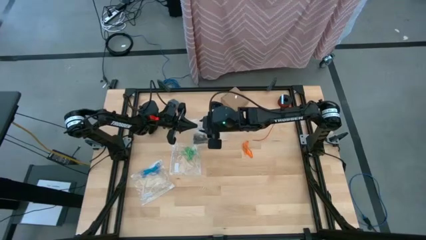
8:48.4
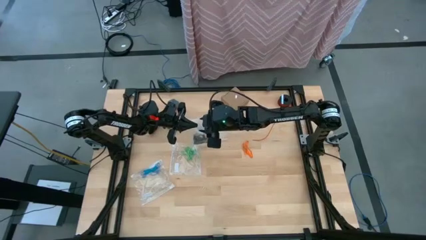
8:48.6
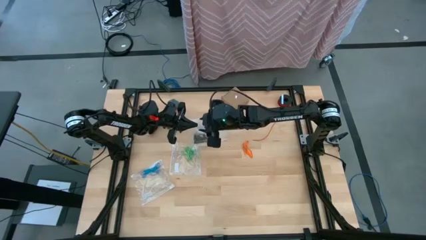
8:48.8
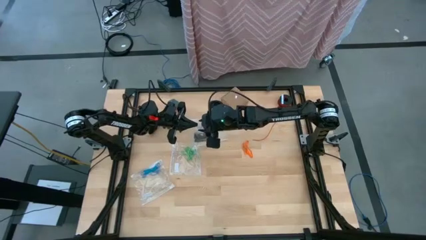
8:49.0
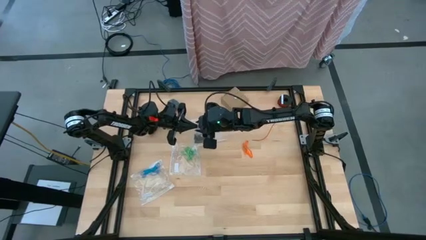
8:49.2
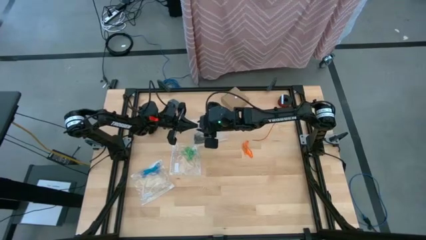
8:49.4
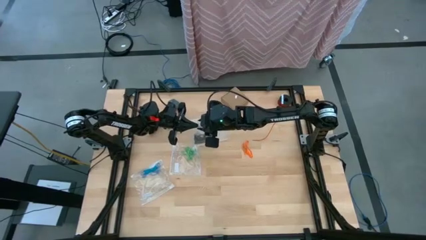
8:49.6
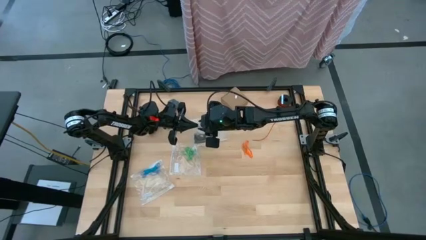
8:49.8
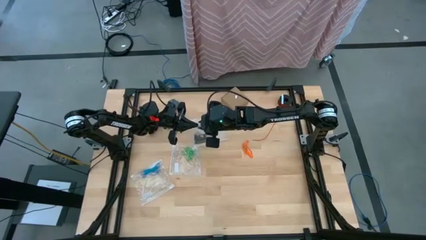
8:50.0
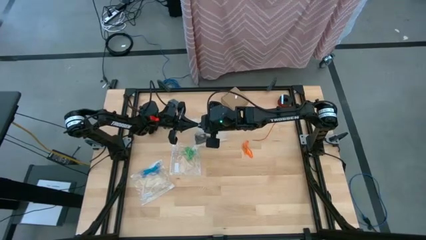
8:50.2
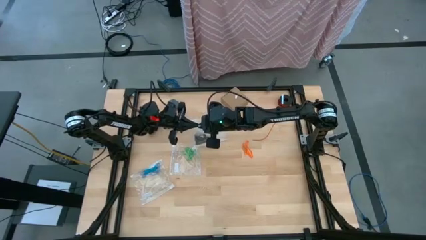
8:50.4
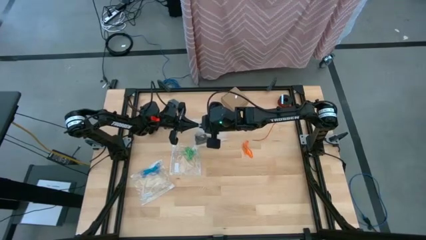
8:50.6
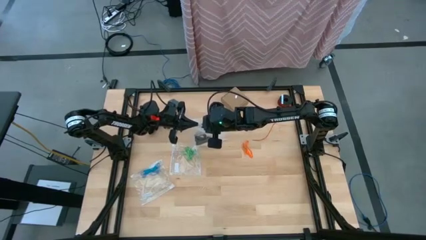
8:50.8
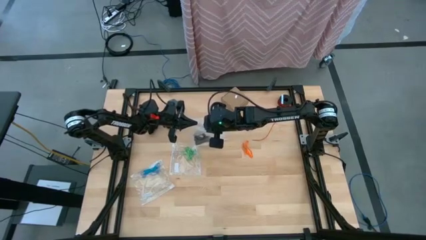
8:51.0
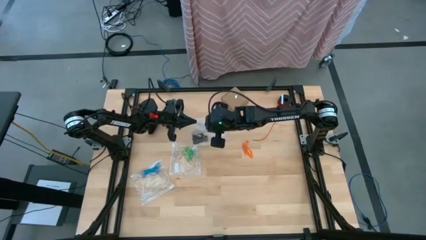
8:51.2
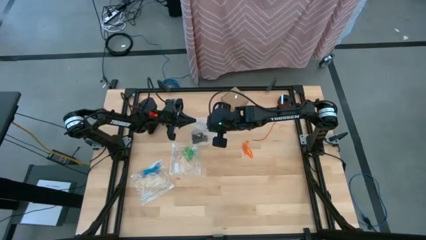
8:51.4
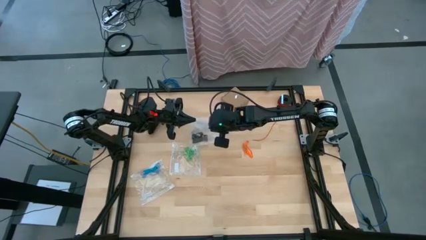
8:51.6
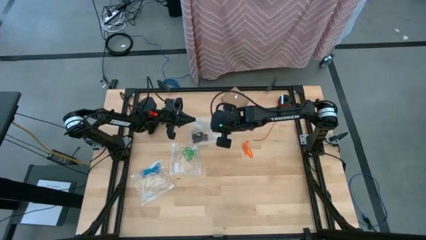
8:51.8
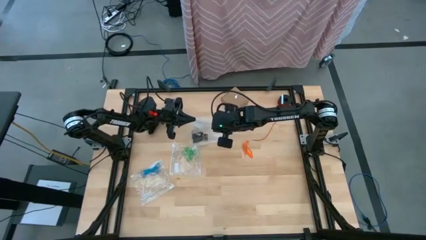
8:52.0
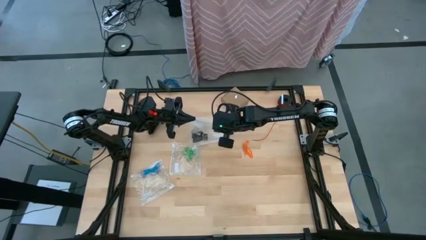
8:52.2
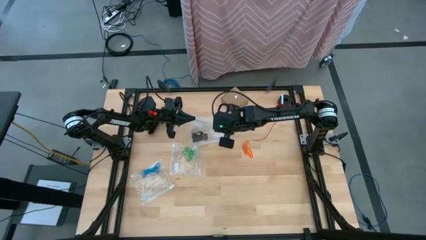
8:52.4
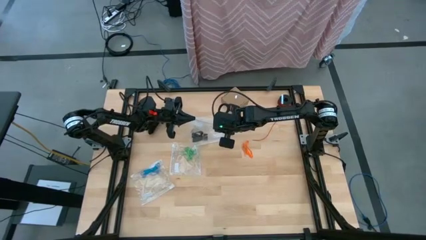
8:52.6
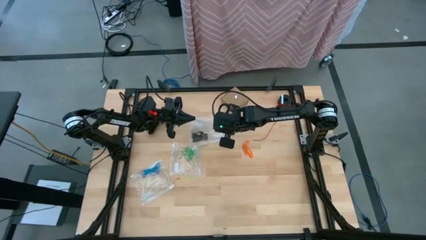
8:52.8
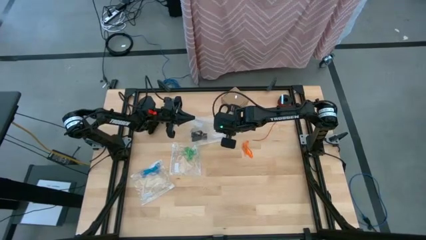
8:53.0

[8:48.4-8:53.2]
Task: Sort rubber bands
Close the transparent zip bag

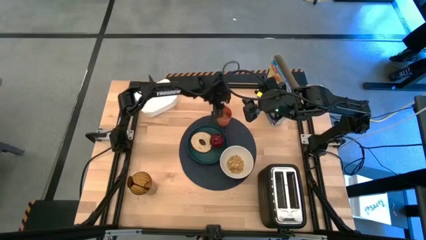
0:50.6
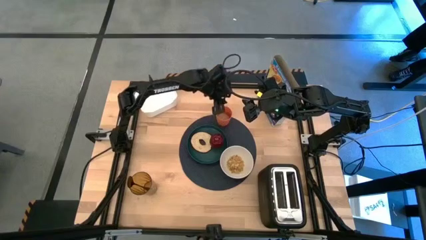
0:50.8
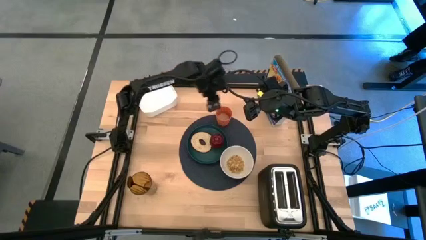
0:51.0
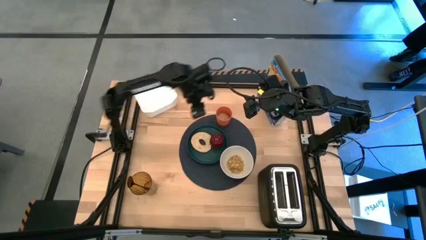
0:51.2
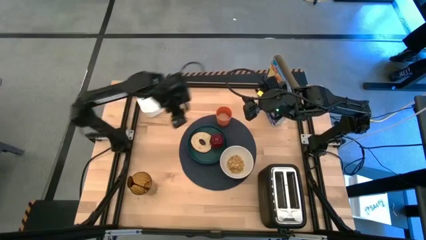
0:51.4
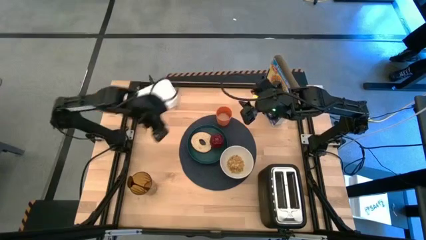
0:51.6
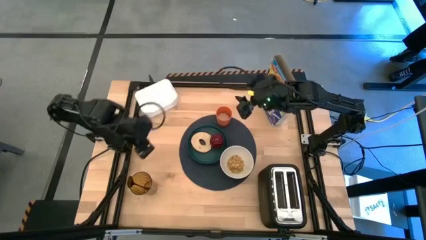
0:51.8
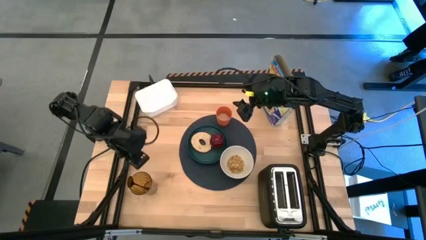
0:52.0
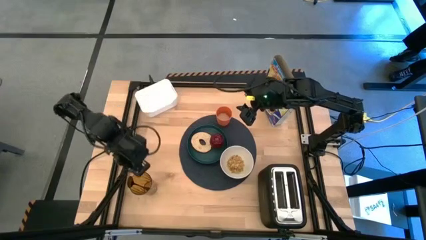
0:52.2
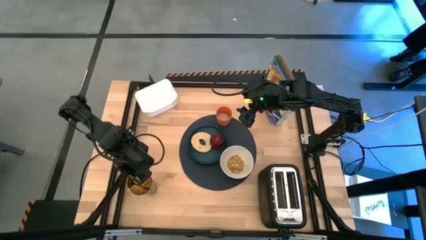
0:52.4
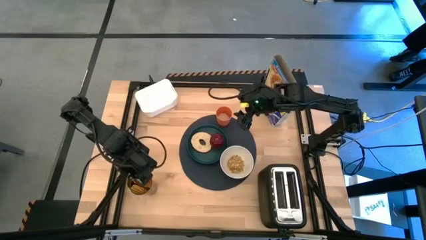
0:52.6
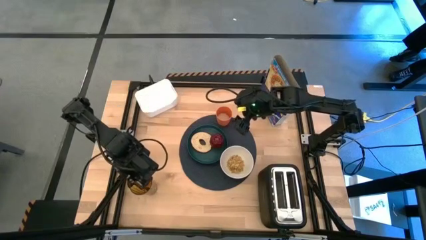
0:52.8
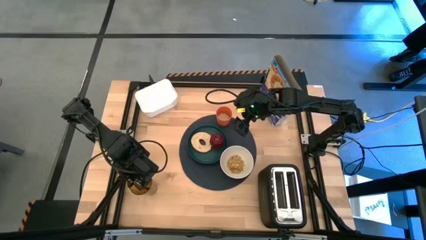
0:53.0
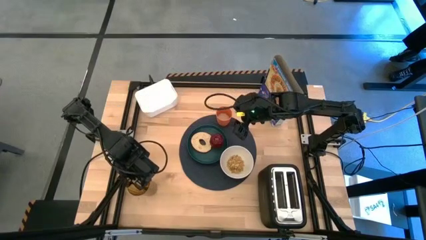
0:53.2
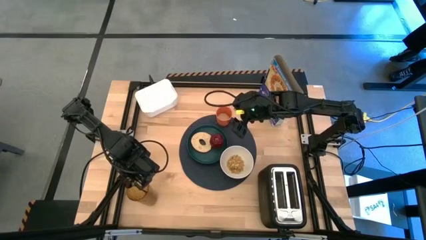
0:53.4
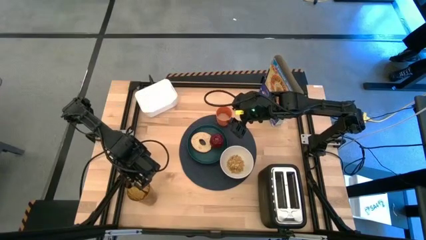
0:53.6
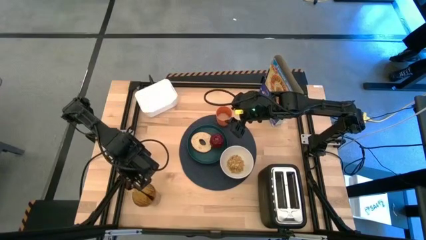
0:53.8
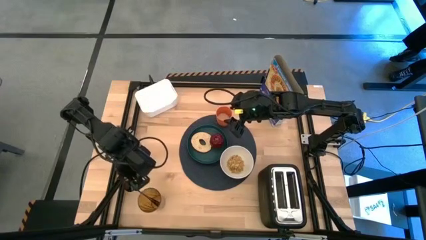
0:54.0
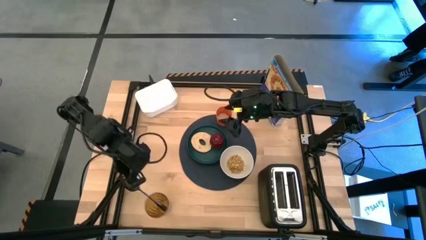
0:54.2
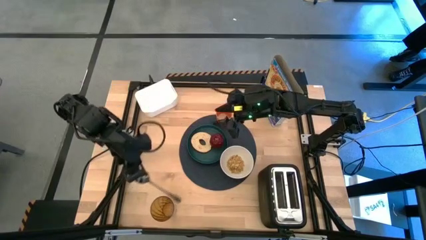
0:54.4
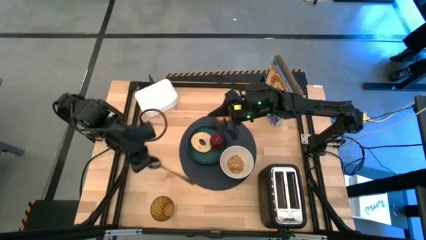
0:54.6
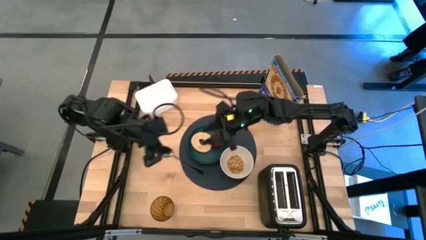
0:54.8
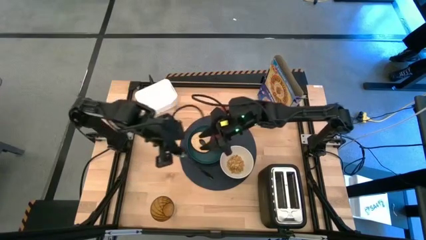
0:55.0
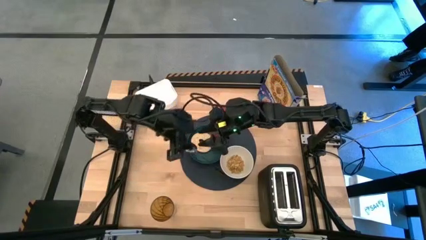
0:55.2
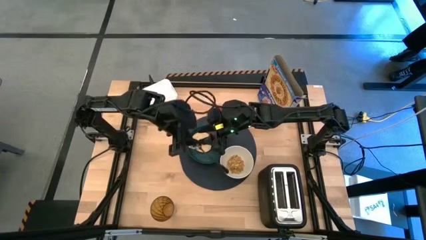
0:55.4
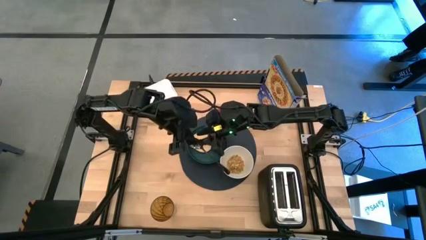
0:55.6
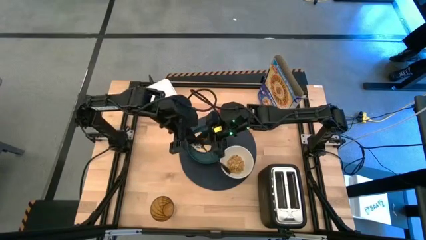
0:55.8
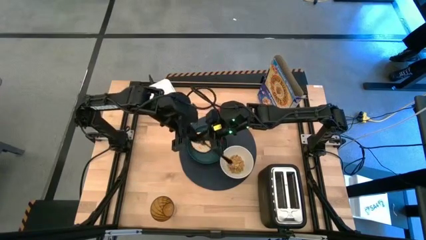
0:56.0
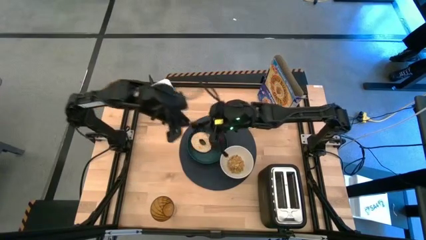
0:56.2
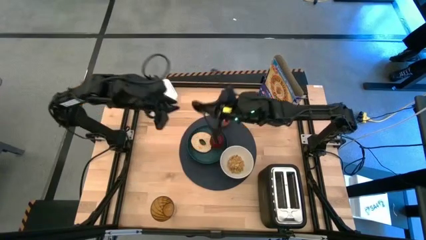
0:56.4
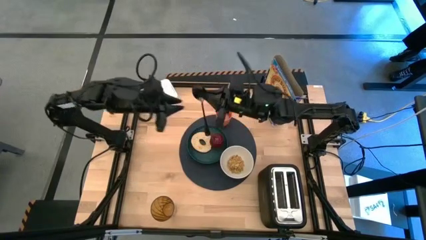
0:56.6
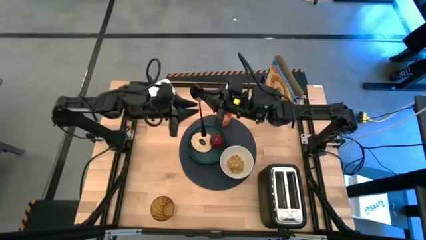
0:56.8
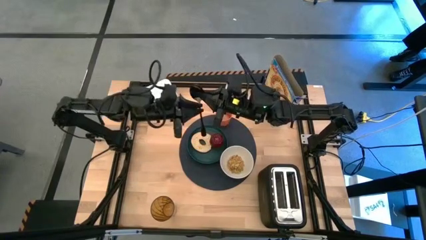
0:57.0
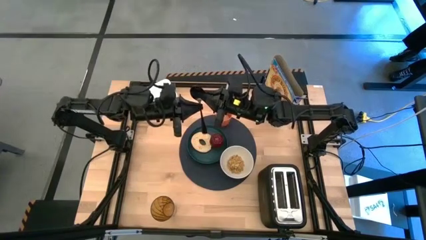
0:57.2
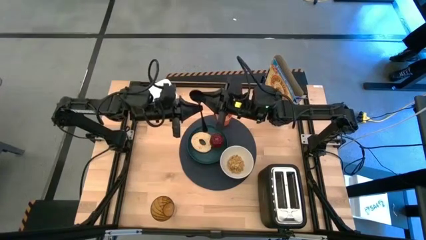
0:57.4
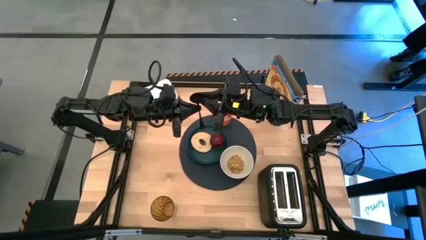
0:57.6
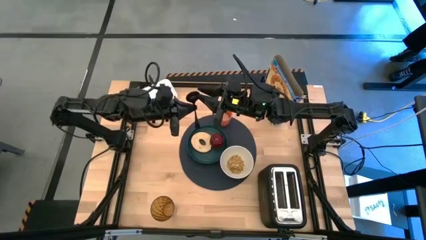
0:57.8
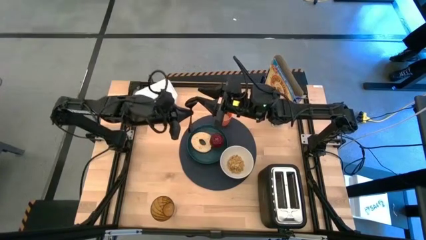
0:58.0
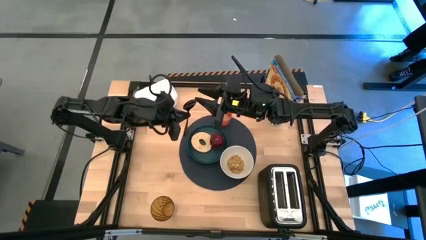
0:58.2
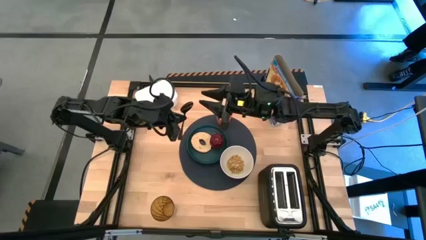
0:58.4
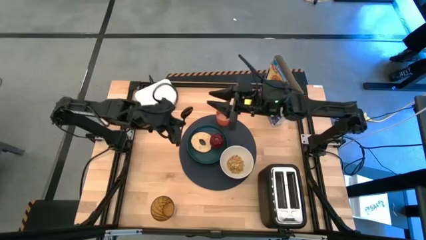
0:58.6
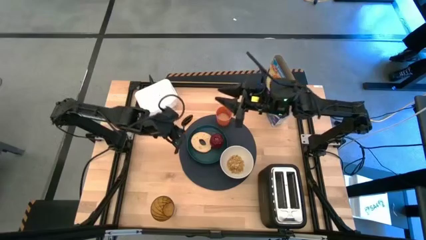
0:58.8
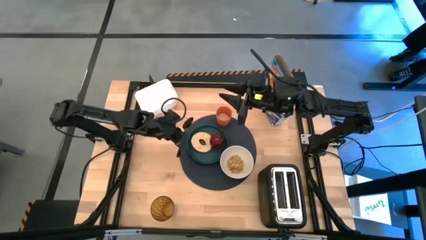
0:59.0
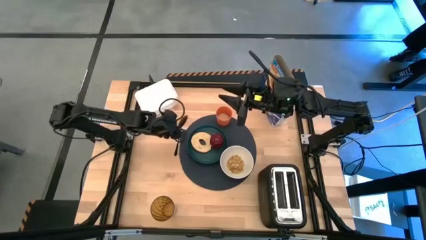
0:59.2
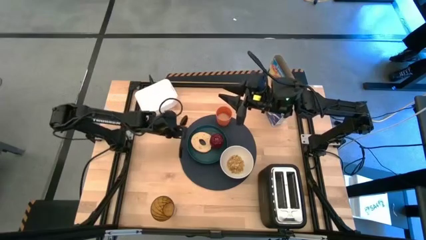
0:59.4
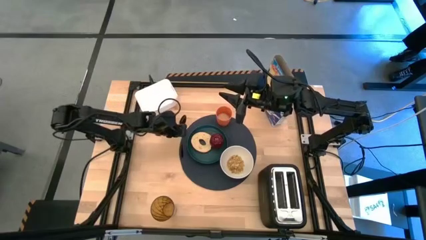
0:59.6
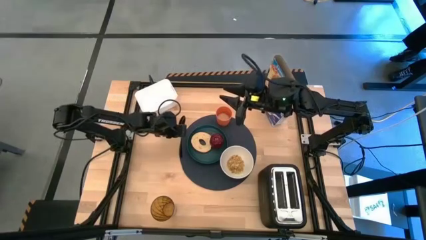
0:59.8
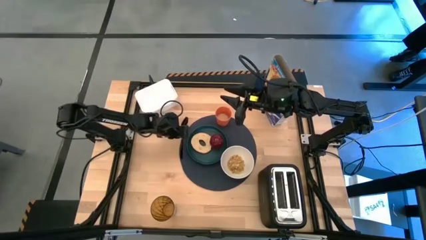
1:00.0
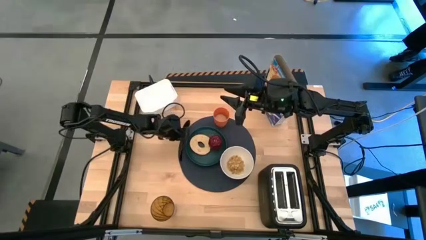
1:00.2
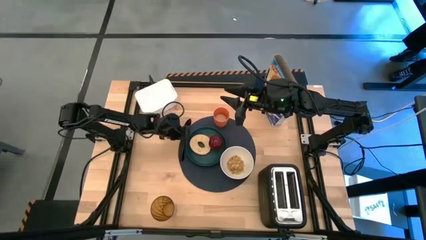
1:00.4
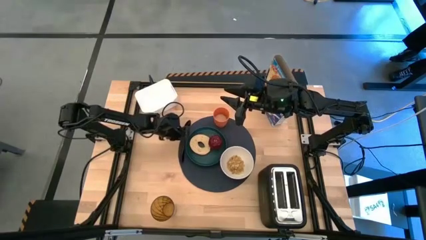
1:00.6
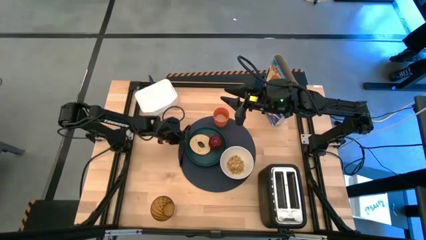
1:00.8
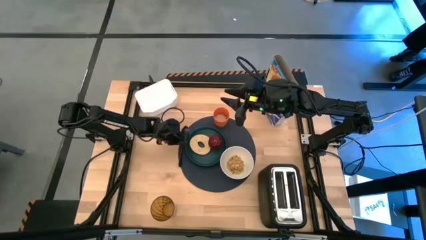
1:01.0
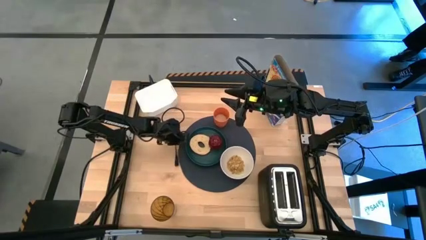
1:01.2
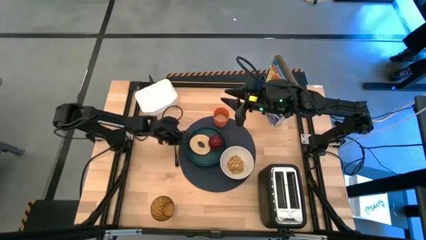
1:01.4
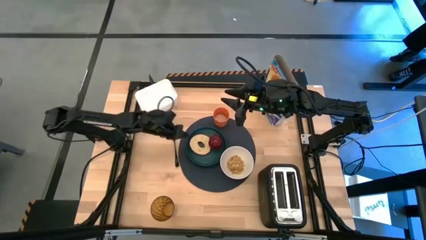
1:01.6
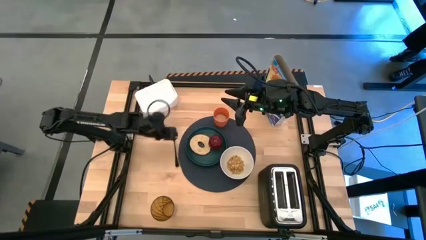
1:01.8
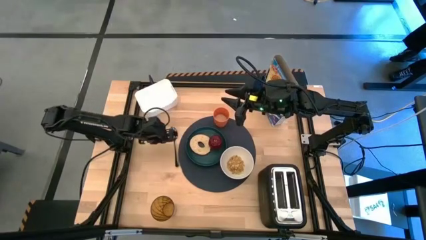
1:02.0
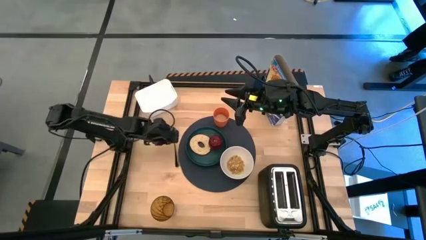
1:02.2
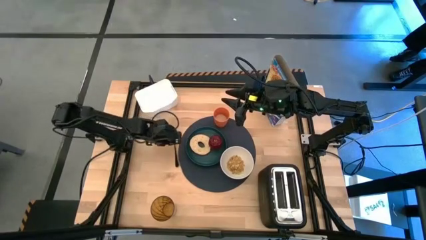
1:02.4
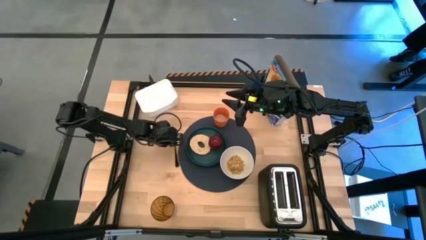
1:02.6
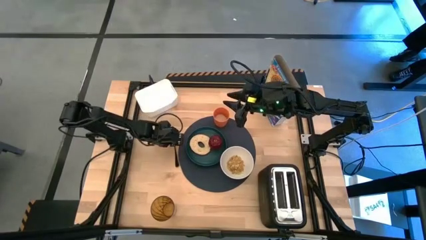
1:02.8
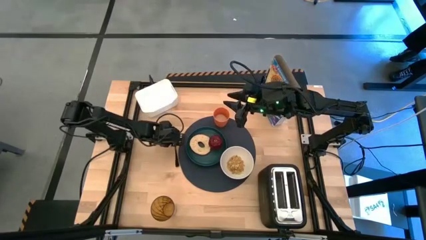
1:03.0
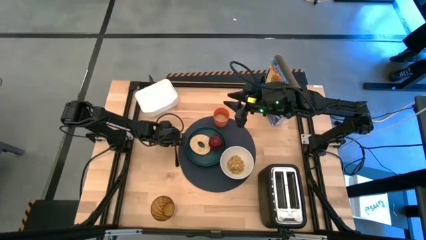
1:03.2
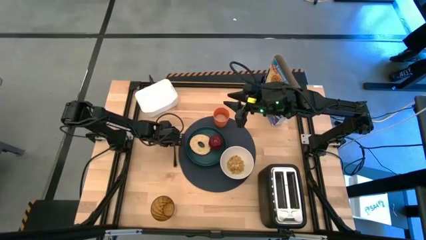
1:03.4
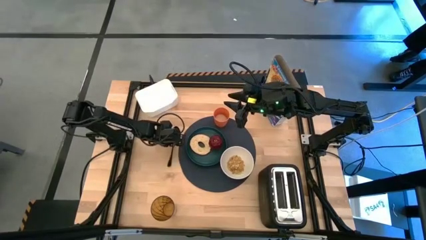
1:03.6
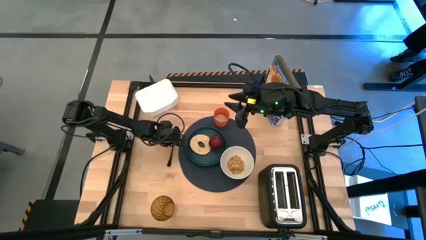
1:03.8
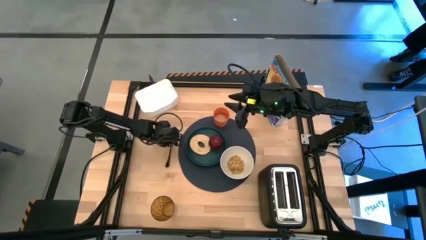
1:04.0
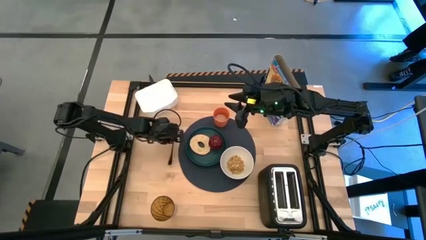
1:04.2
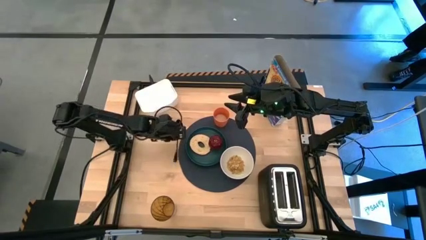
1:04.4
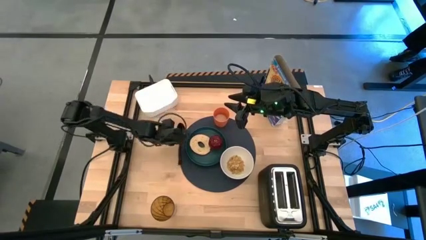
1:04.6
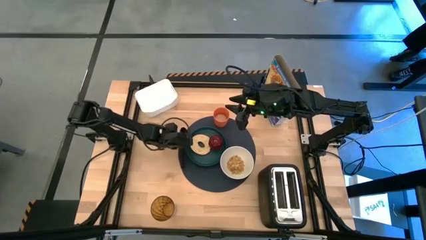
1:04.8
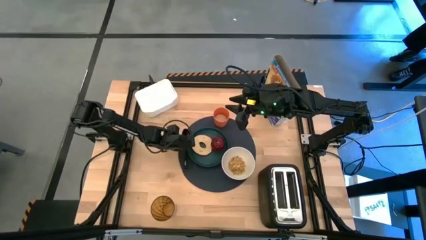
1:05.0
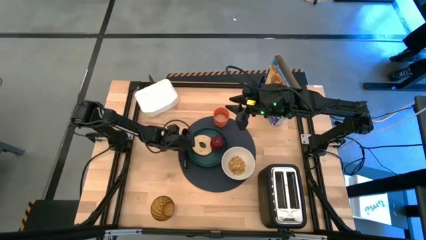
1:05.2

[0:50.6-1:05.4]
Task: Arrange a breakfast setting
Put the black spoon to the left of the green plate on the black table mat
